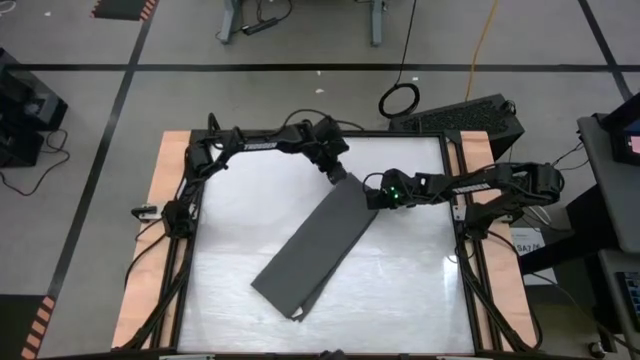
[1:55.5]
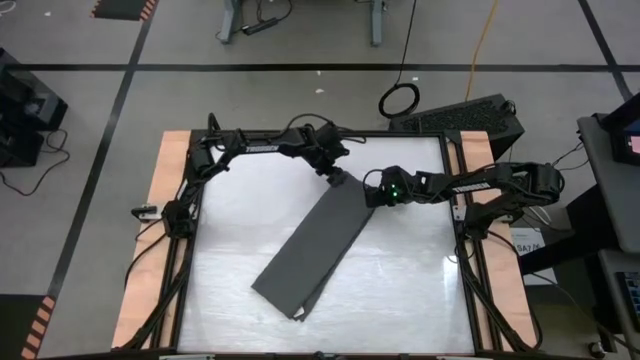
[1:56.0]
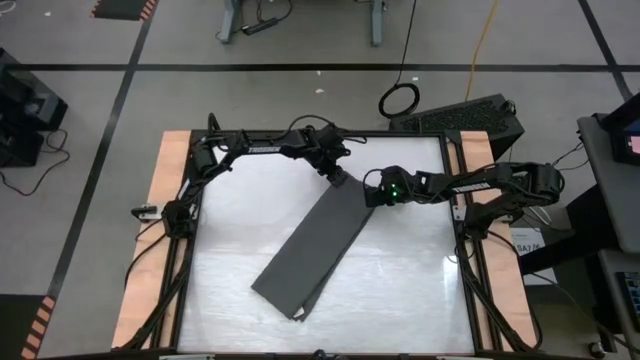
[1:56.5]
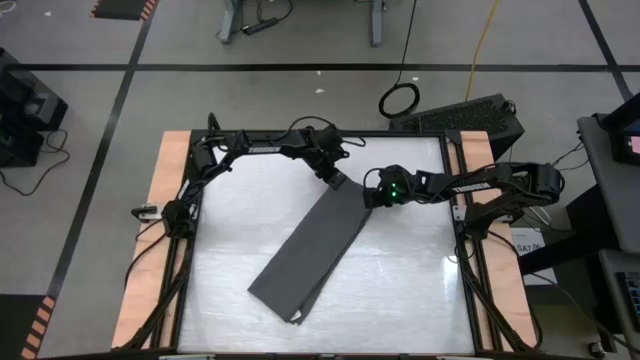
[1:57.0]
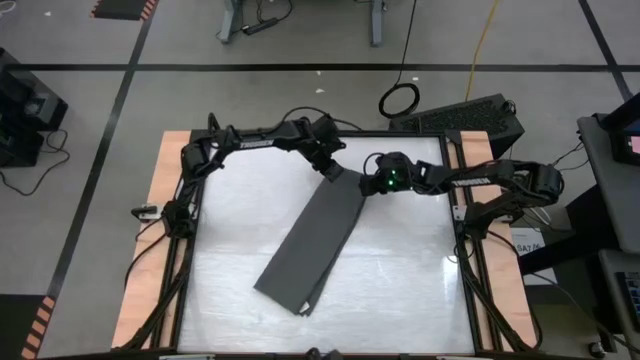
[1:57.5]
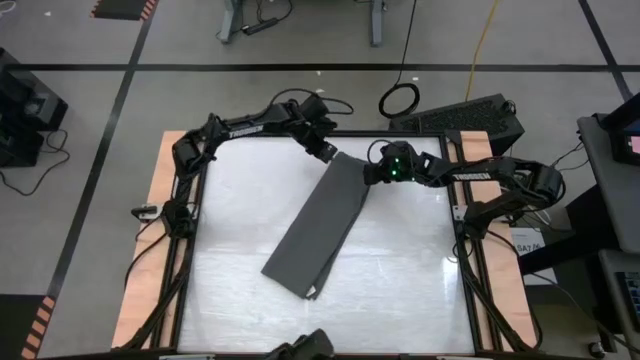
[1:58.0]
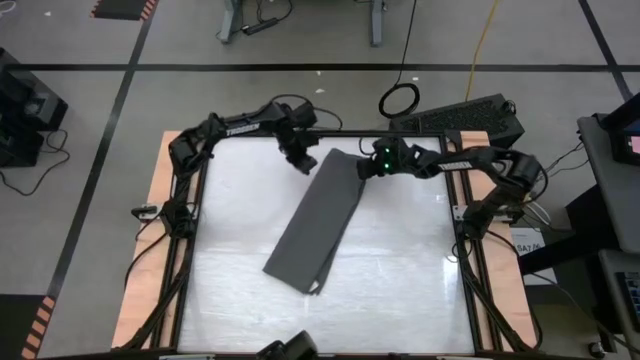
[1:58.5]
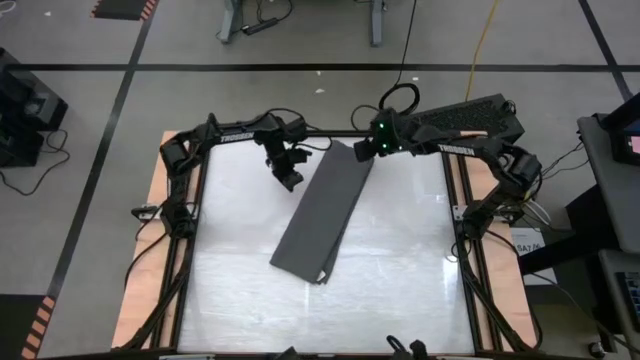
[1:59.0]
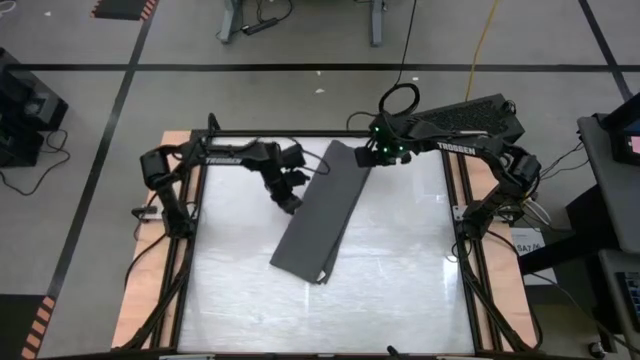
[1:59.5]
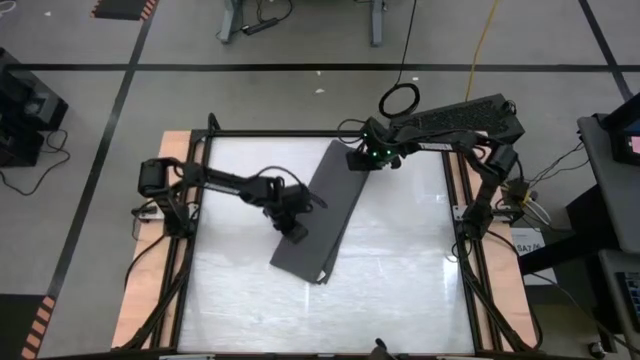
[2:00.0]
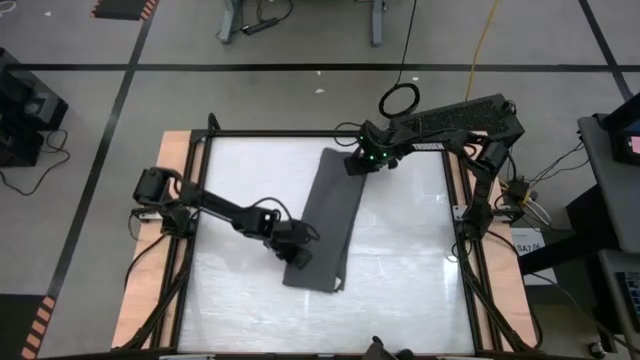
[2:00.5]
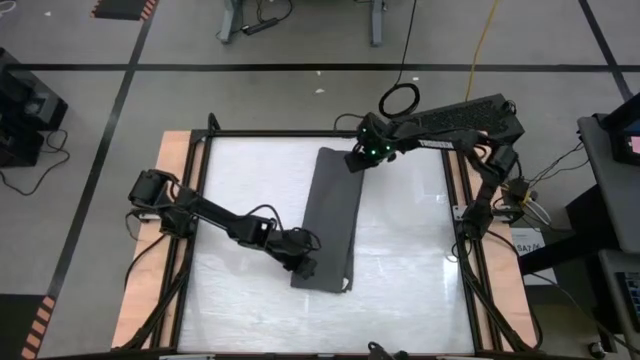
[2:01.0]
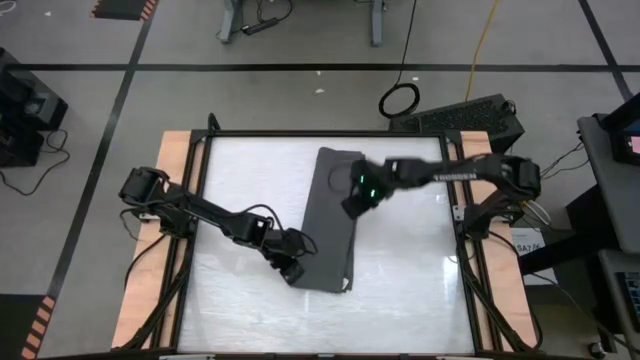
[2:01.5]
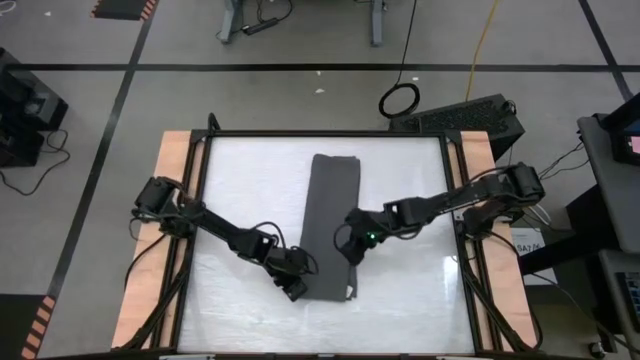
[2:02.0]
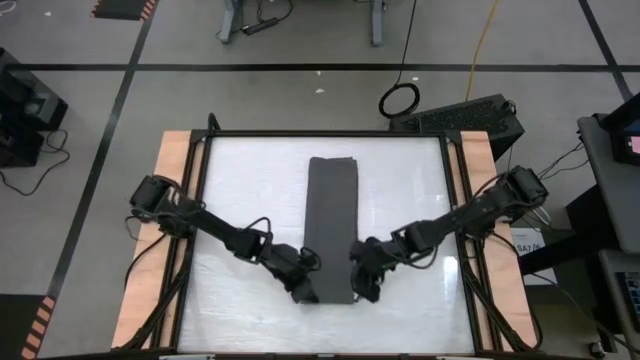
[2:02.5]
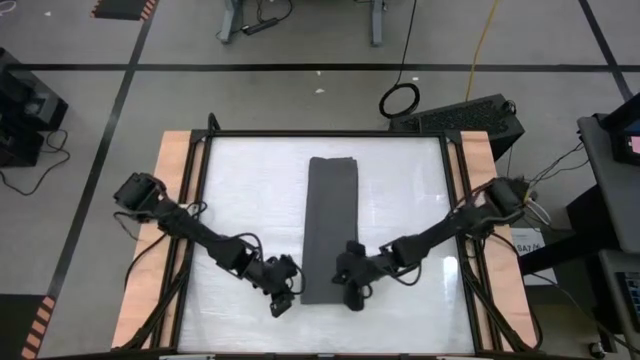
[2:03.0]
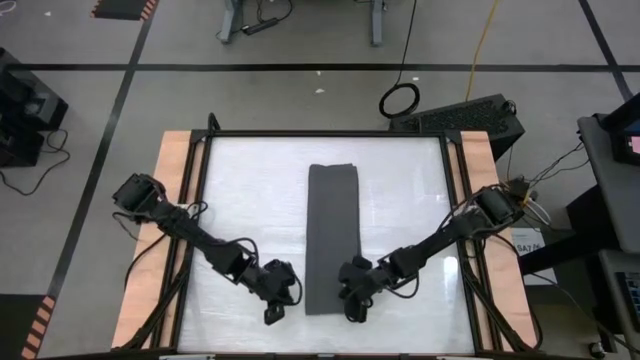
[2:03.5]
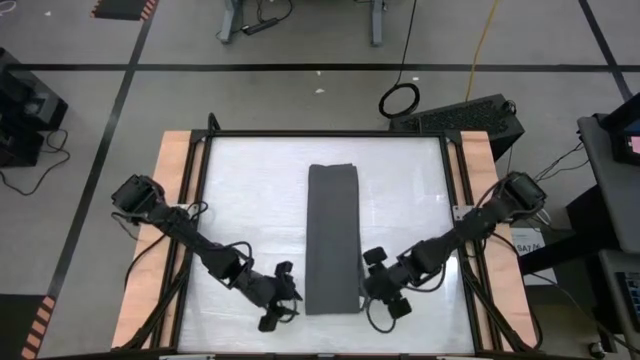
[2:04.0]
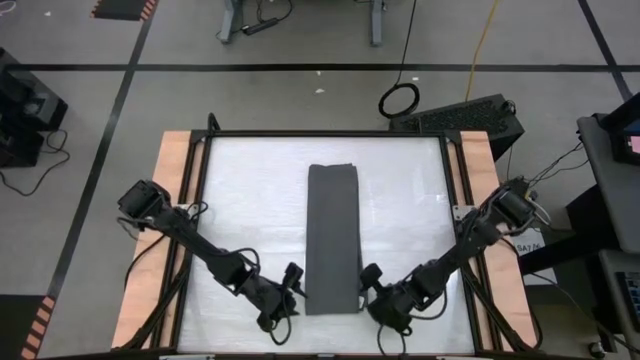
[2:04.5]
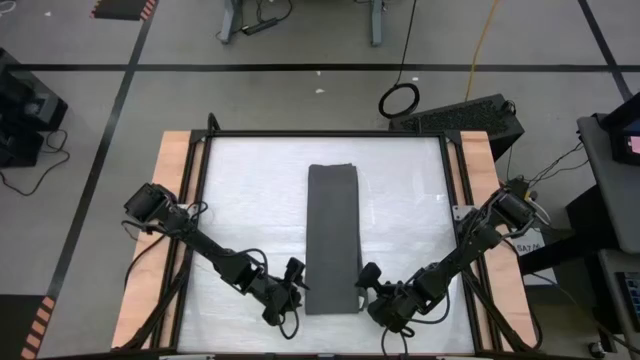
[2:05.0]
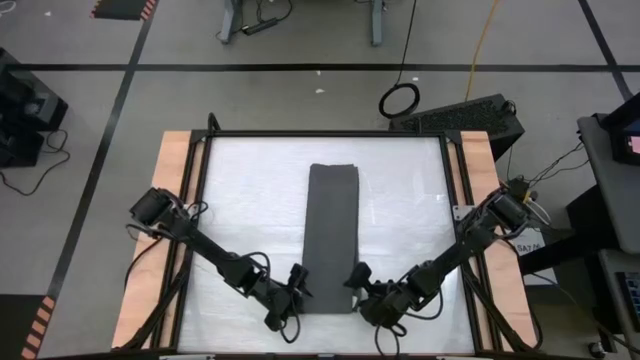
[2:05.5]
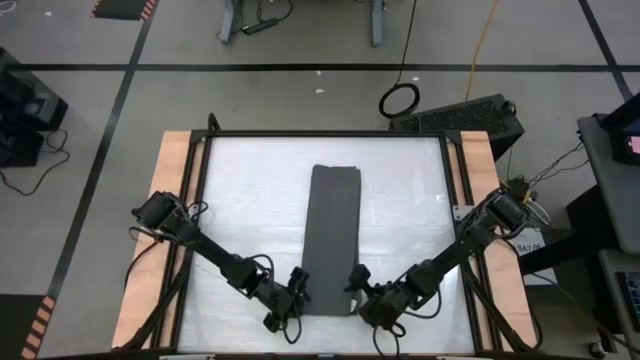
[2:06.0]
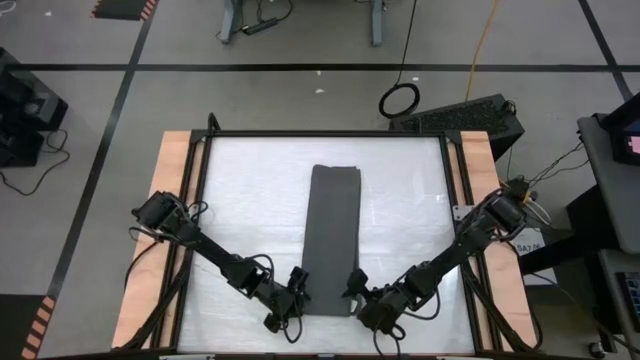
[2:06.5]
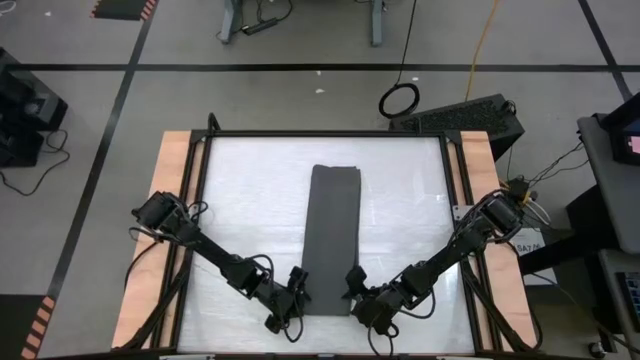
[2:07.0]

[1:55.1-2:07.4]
Task: Roll towel into tight, uniform cylinder
Roll the gray towel

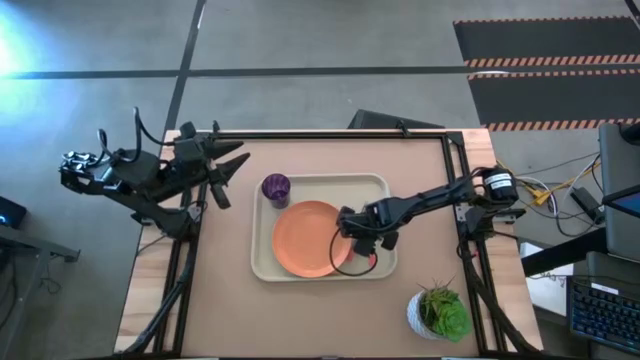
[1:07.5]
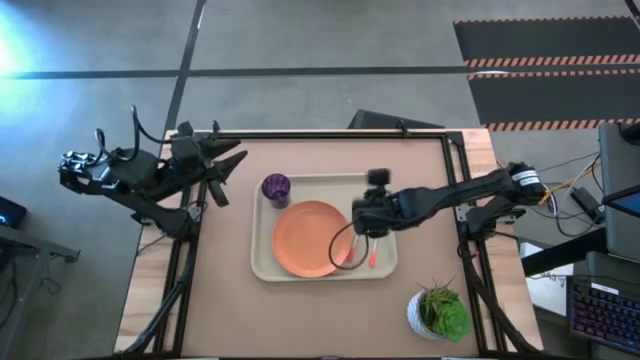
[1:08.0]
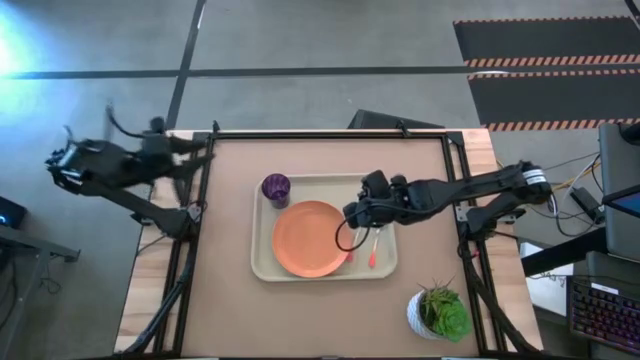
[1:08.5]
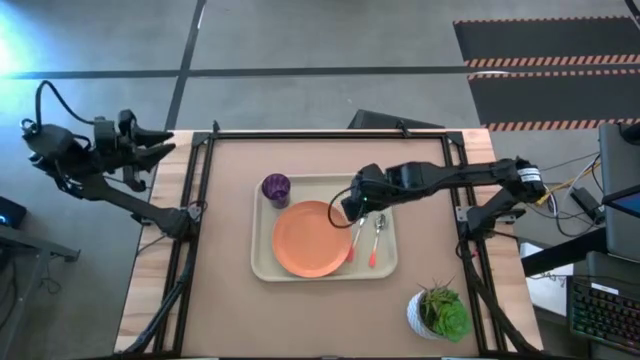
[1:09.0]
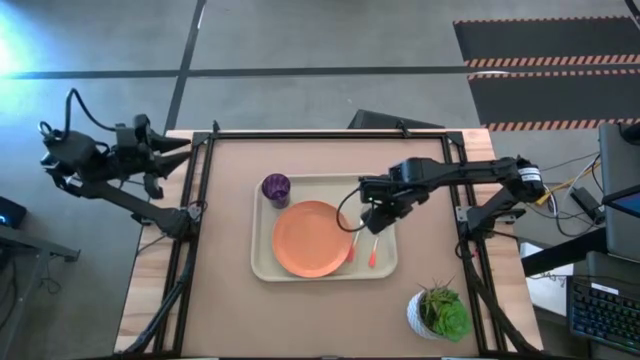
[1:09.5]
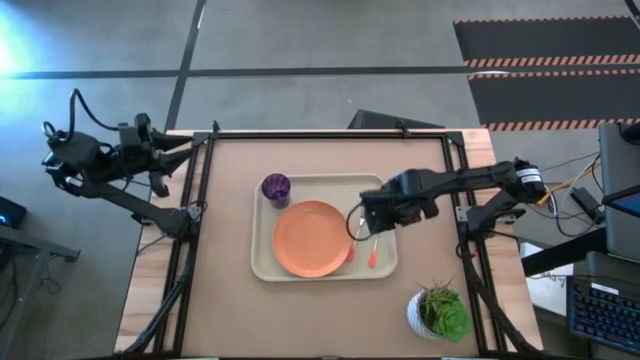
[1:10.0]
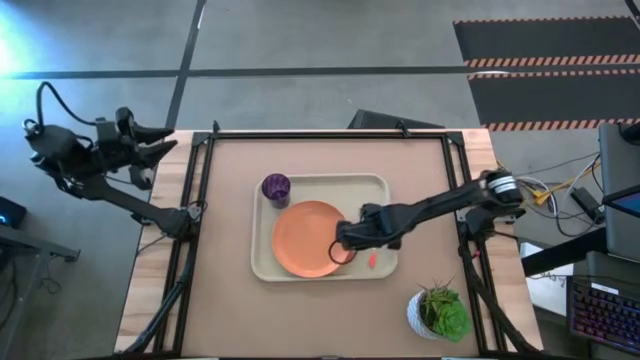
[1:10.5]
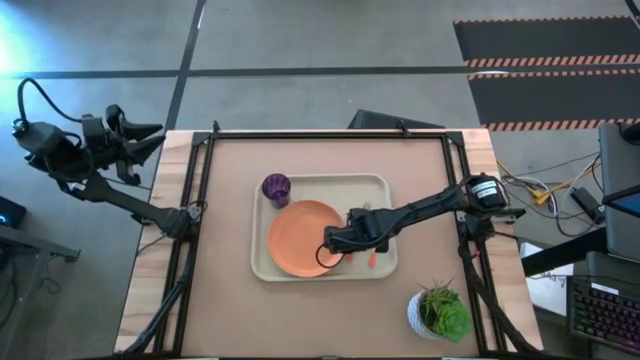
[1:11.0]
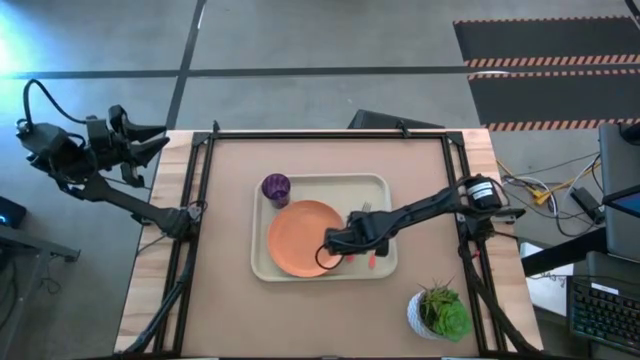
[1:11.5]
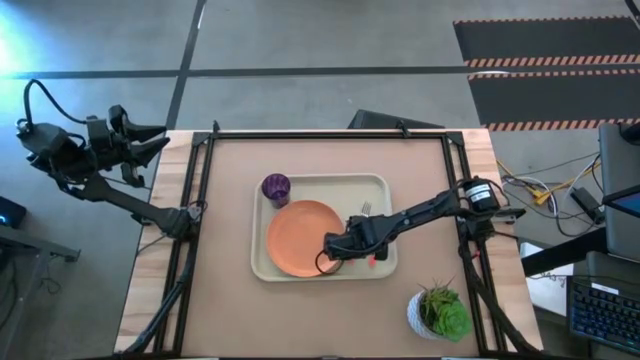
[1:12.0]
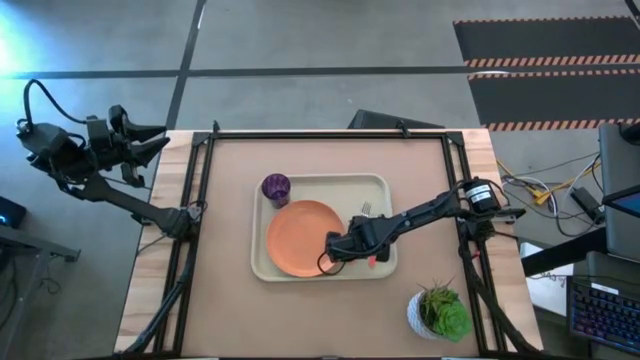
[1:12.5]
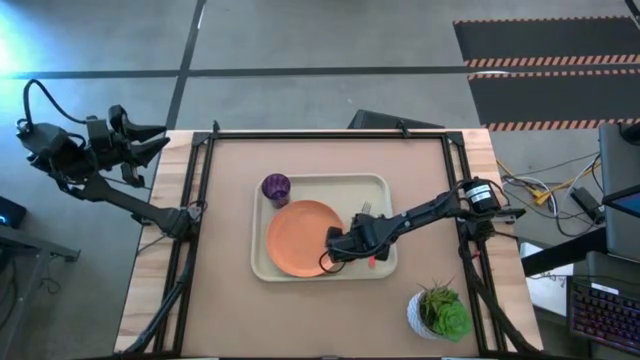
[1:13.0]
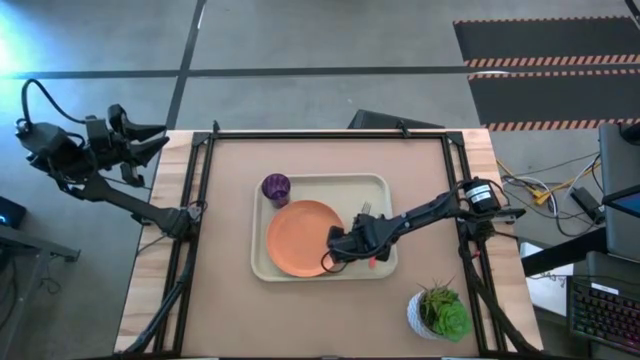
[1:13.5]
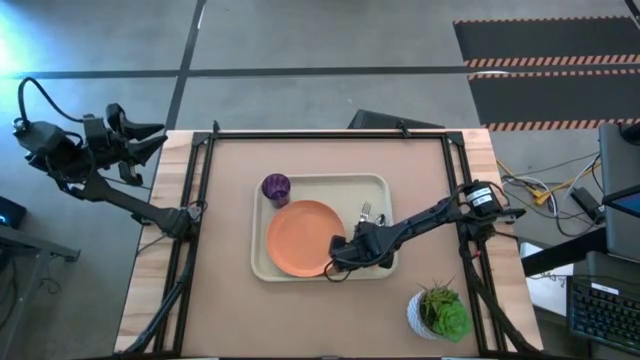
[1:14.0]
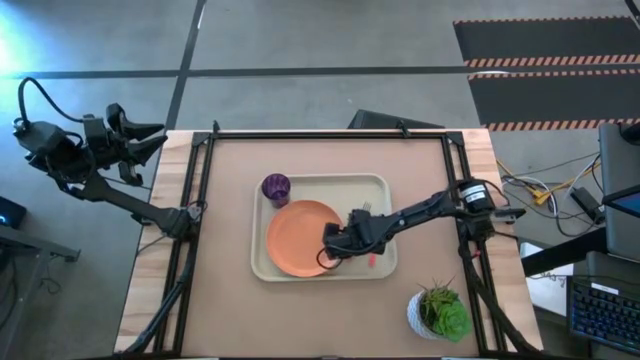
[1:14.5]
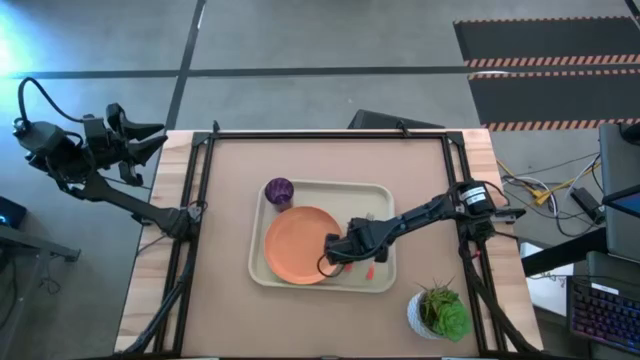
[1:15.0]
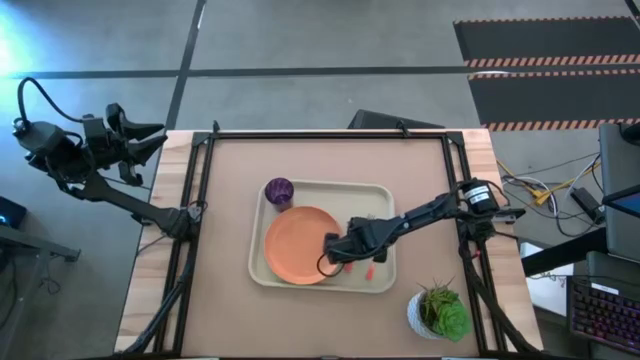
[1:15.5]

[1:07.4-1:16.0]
Task: Pick and place plate/cup/fork/spoon on tray
Adjust the orange plate

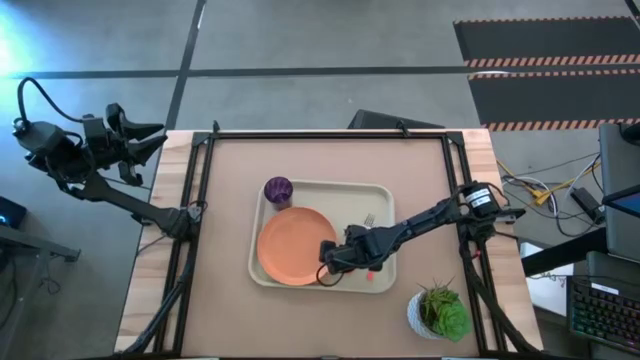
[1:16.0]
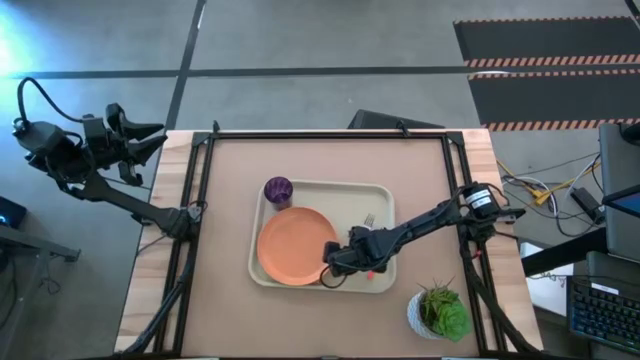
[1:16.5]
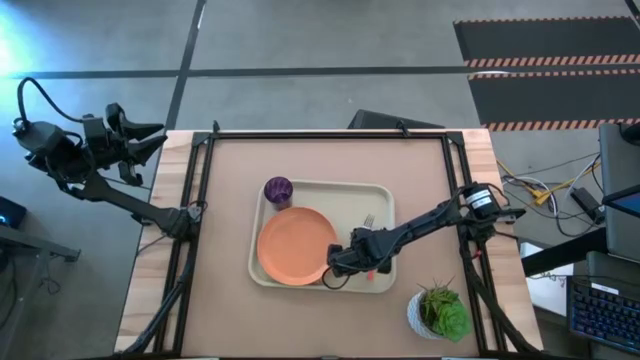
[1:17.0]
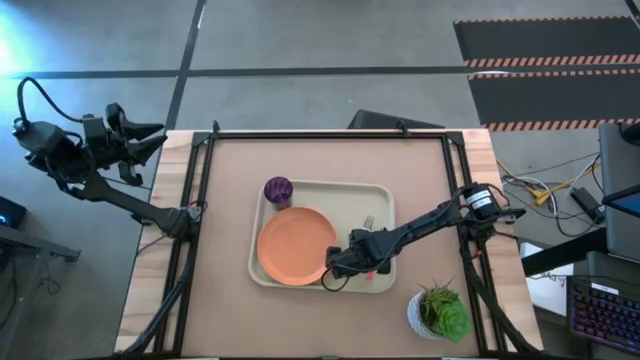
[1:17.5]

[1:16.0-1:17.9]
Adjust the orange fork
